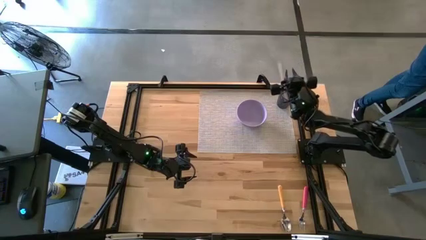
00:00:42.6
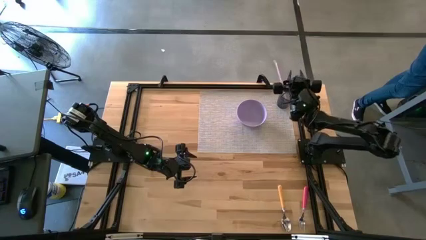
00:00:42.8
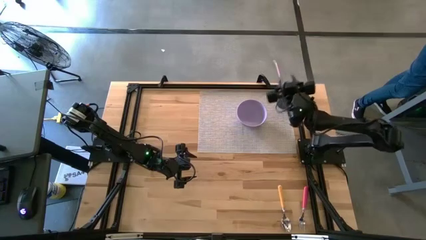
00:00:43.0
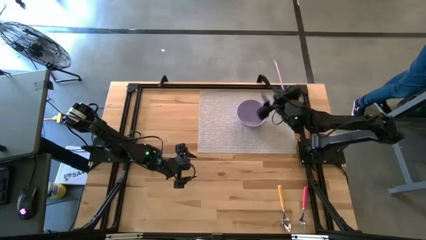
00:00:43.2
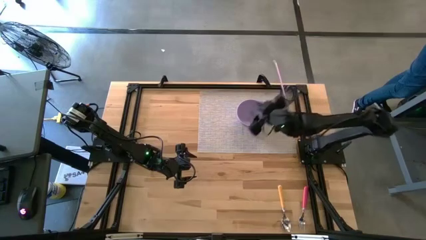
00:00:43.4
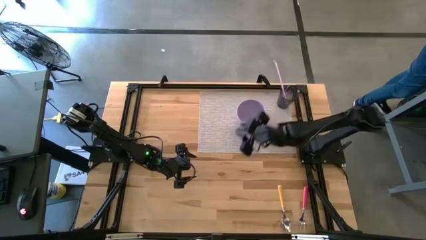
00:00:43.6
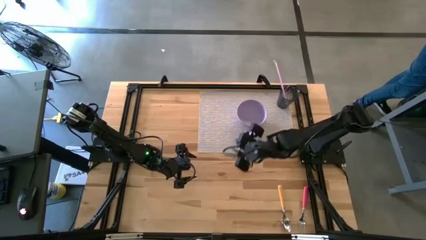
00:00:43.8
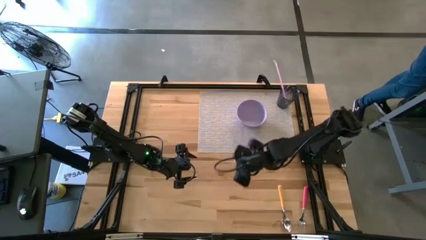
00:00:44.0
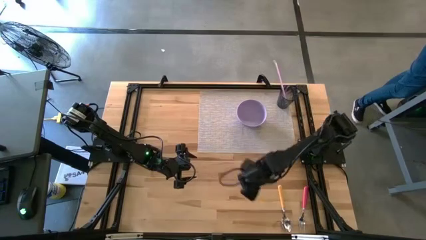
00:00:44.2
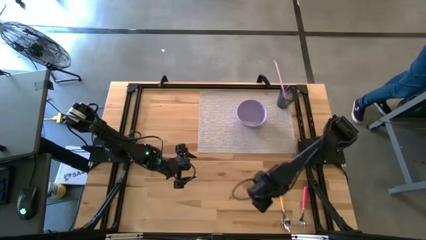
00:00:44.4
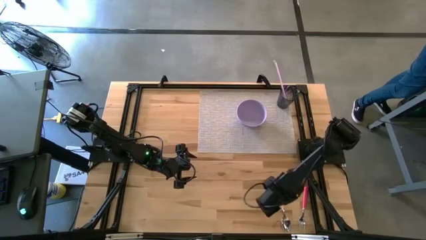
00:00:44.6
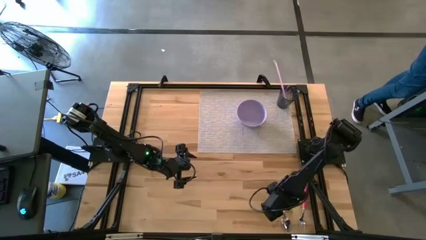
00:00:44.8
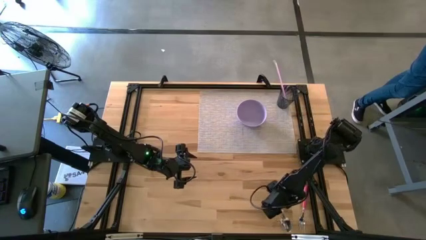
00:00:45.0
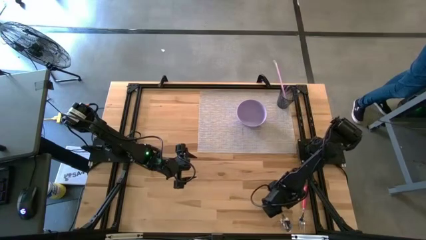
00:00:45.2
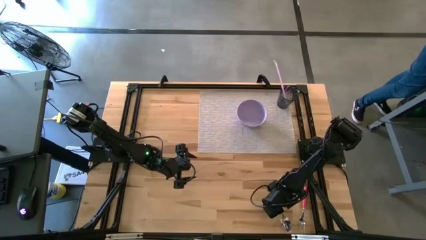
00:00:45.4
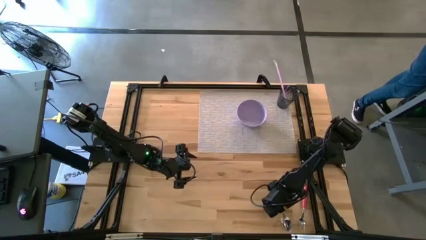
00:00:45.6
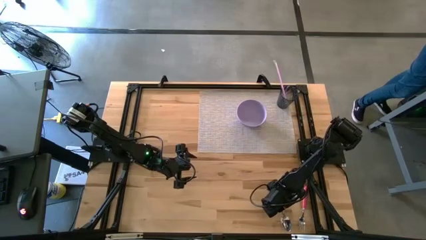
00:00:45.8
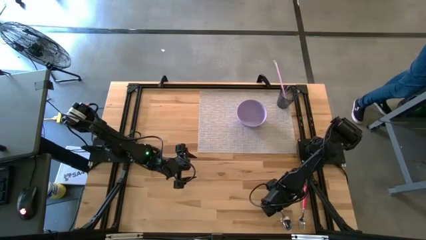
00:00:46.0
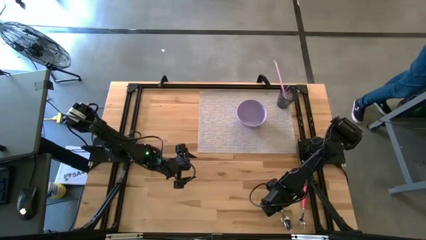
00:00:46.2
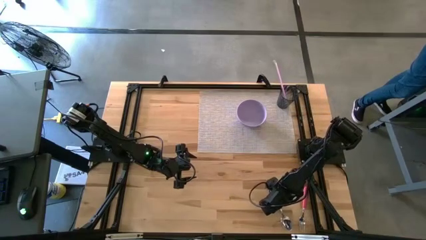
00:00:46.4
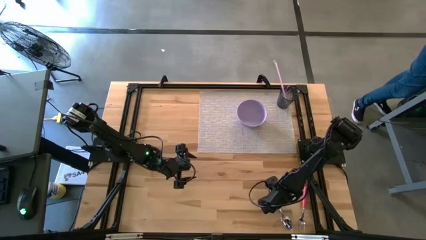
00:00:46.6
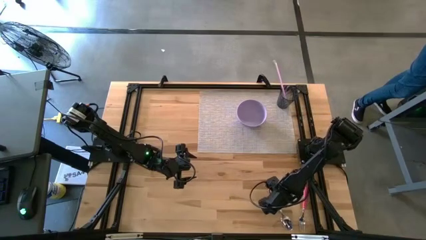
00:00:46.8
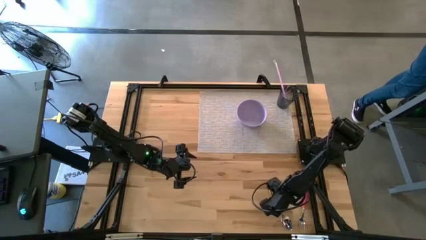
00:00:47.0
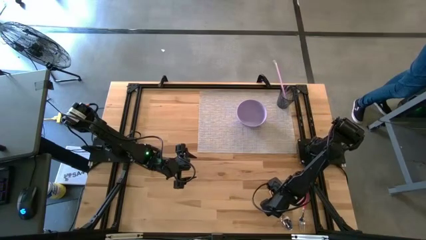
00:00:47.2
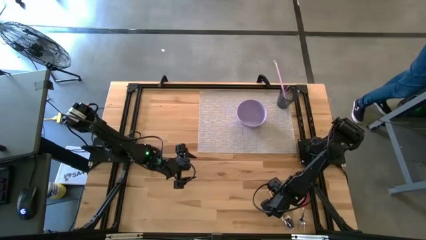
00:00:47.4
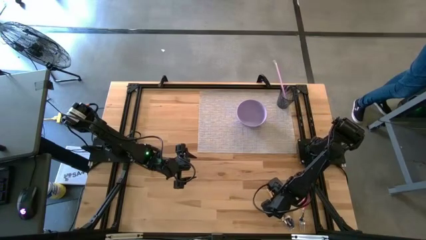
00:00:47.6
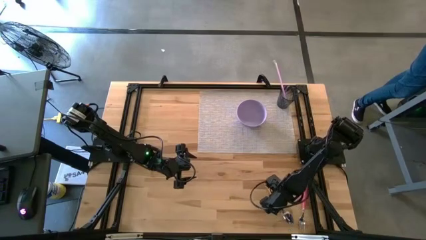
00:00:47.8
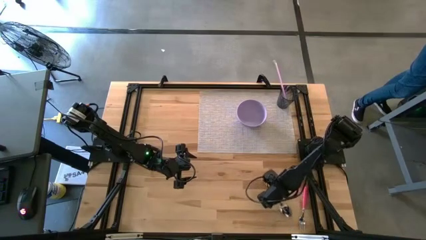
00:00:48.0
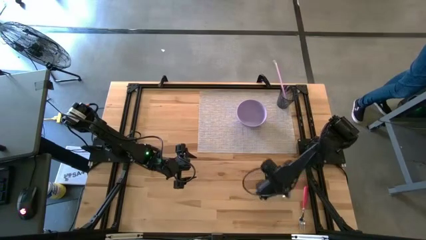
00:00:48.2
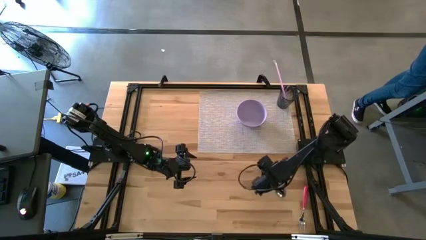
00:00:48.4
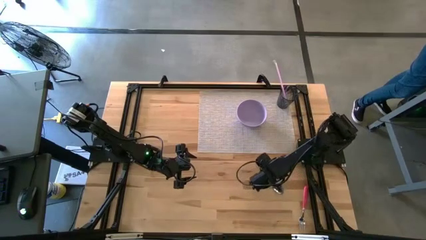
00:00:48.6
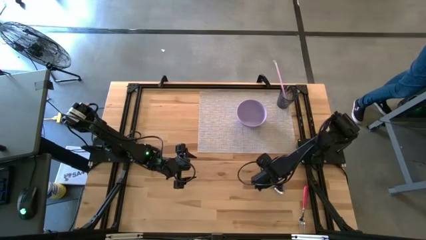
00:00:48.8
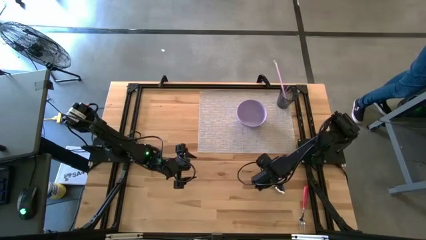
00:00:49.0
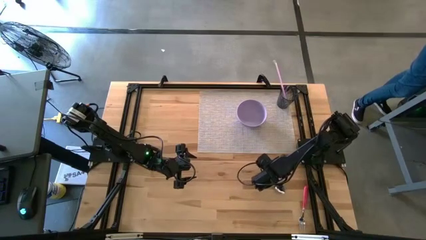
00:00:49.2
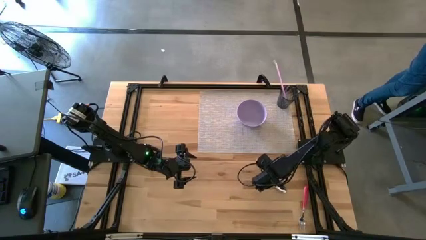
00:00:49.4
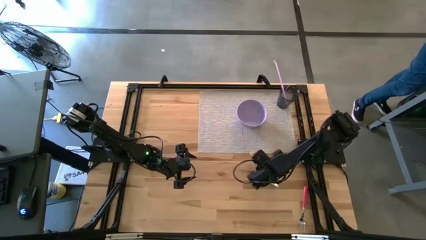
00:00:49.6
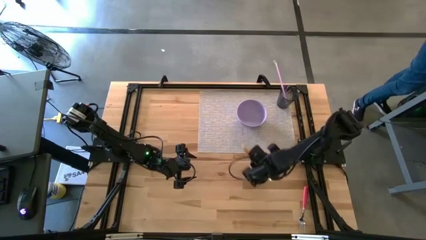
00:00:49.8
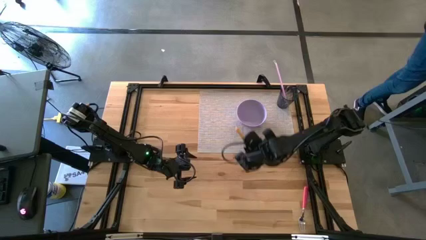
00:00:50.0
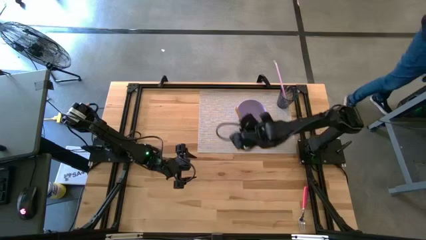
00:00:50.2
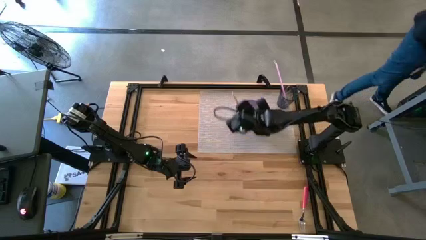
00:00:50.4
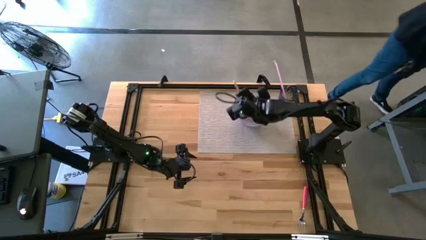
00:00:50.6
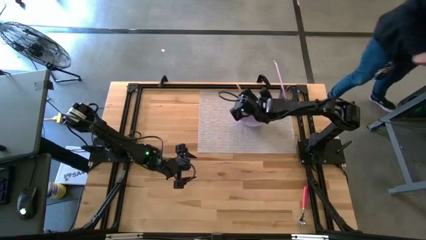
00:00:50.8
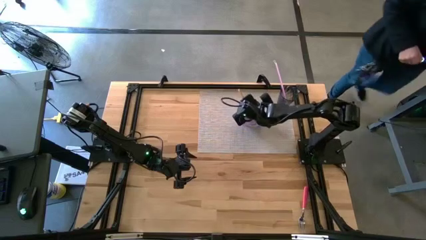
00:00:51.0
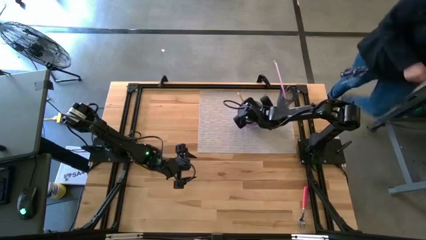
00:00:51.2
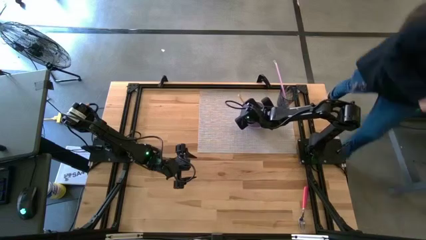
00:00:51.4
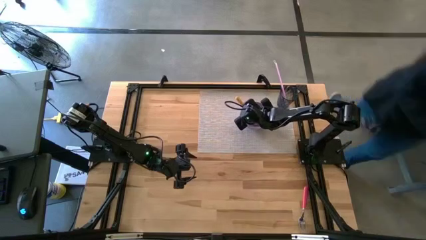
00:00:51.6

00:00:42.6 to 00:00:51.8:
Task: Pick & Place Utensil
Put the yellow spoon into the violet bowl

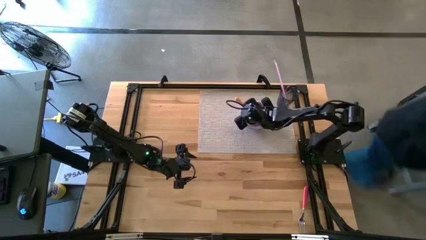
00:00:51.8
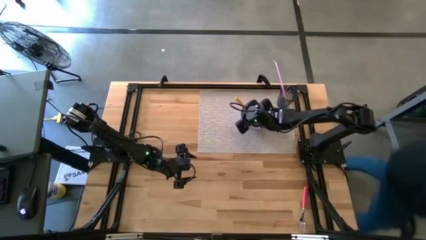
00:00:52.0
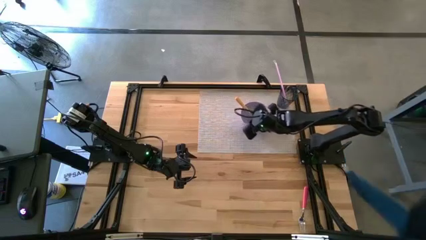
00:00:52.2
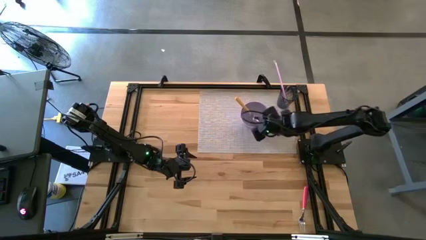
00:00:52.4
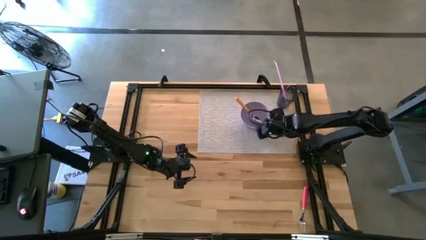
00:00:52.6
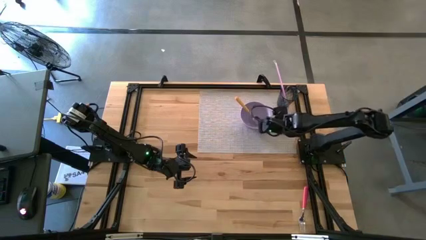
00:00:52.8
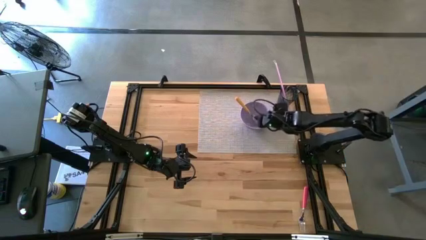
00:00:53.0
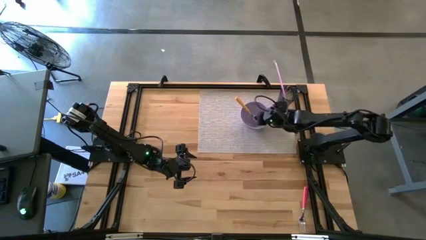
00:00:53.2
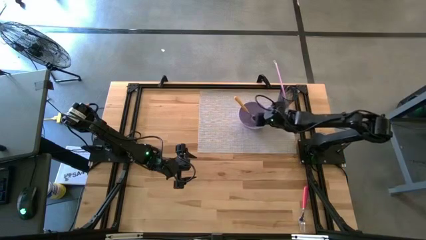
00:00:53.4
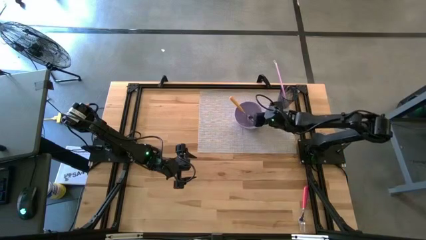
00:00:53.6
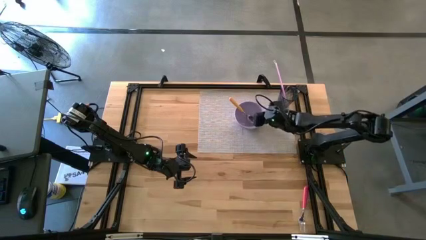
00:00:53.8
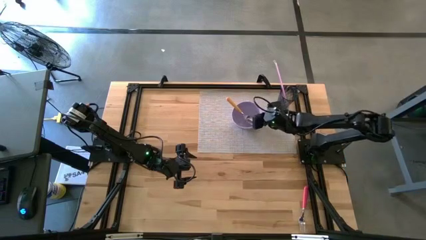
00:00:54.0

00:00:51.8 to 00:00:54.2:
Adjust the violet bowl on the gray mat

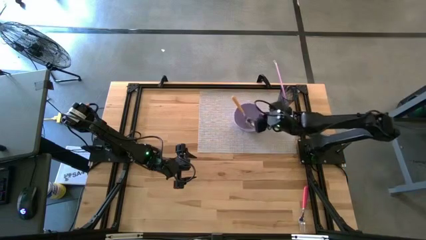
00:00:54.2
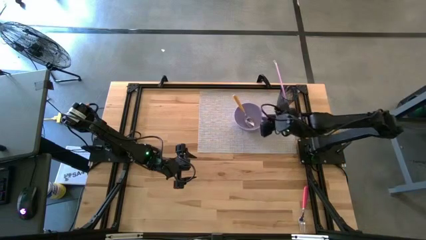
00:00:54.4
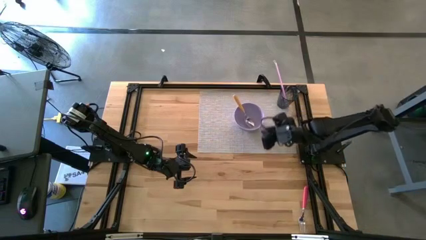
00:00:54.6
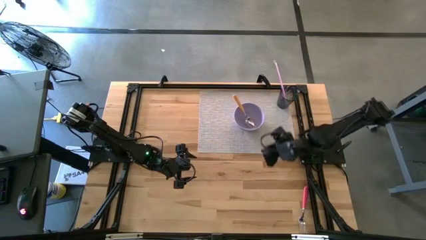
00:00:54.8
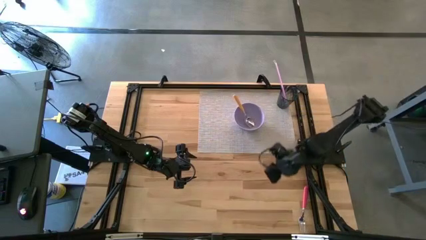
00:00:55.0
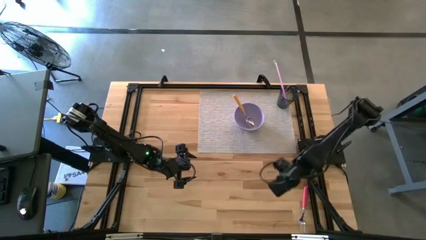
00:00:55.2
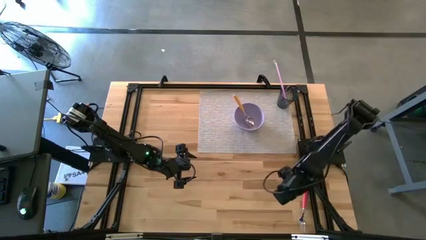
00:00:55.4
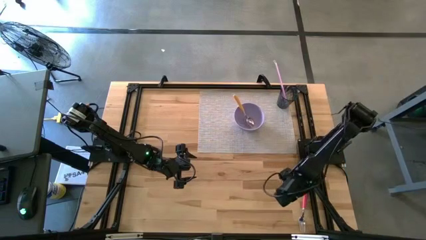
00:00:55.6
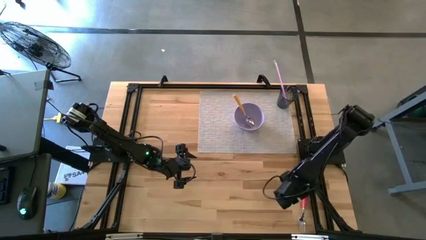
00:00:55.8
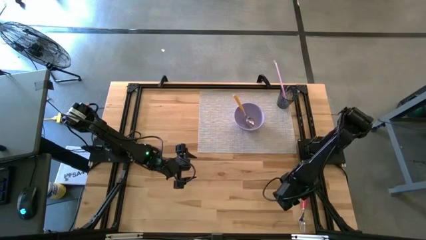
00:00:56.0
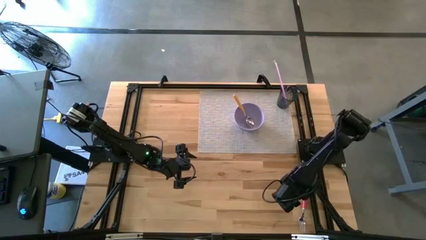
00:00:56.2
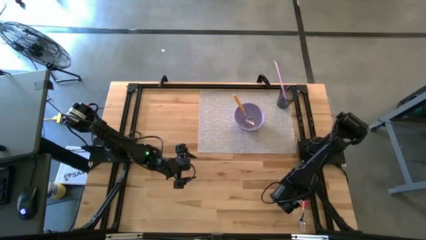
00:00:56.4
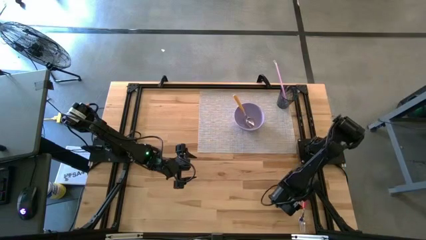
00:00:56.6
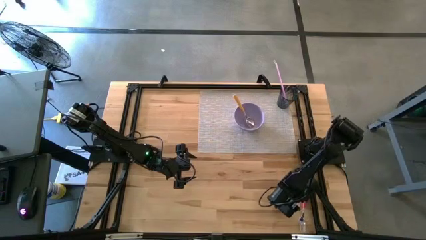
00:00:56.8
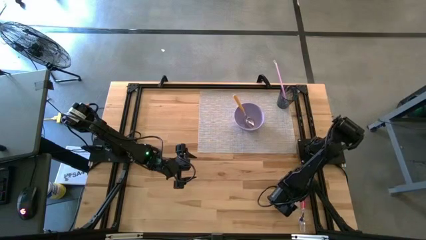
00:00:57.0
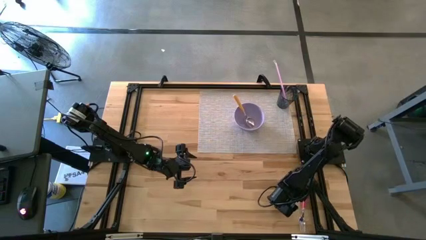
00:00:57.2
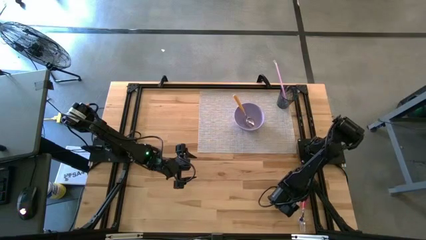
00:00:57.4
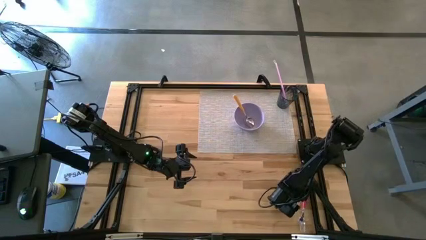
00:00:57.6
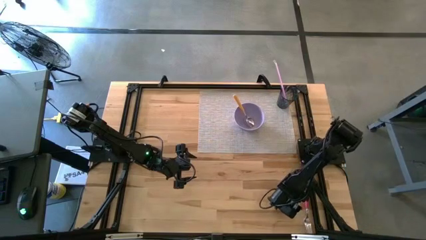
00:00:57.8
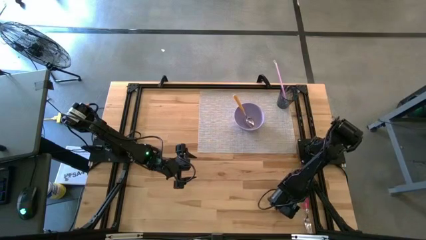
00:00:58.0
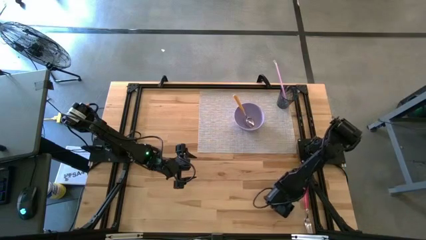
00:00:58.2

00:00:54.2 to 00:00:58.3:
Put the pink fork into the violet bowl
